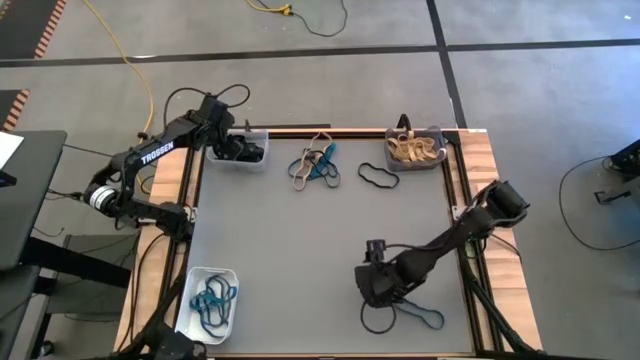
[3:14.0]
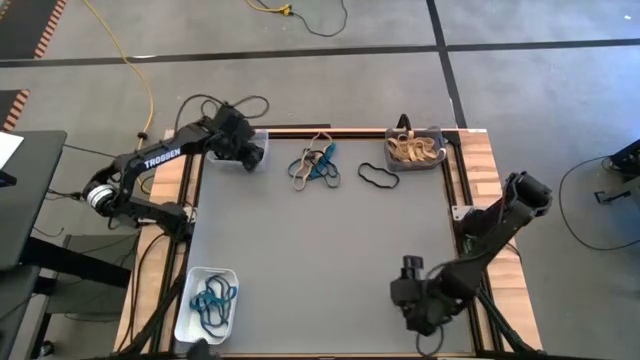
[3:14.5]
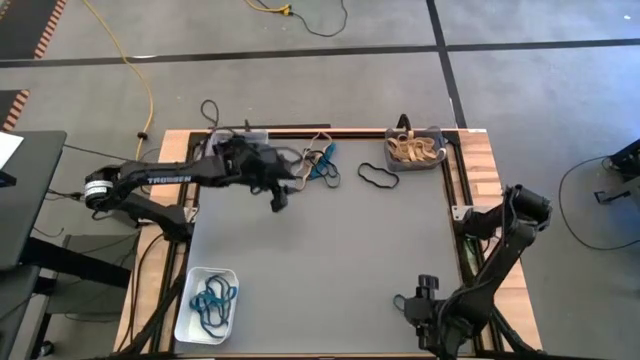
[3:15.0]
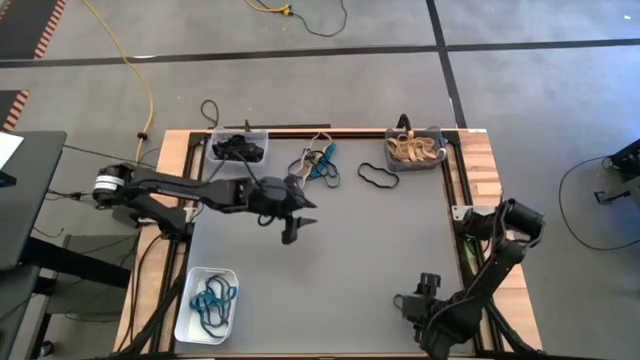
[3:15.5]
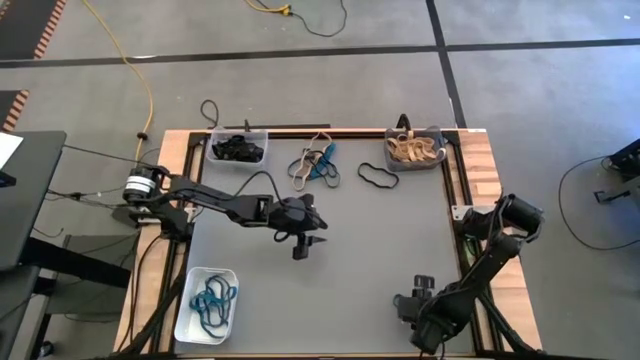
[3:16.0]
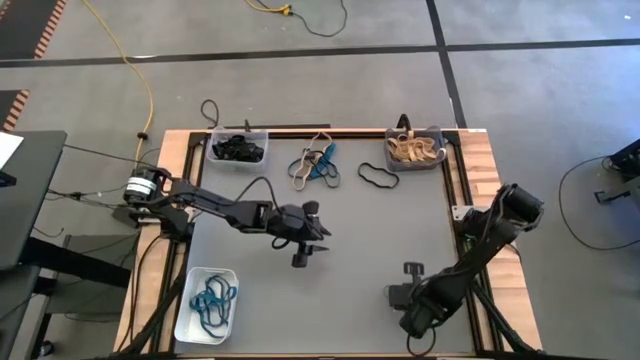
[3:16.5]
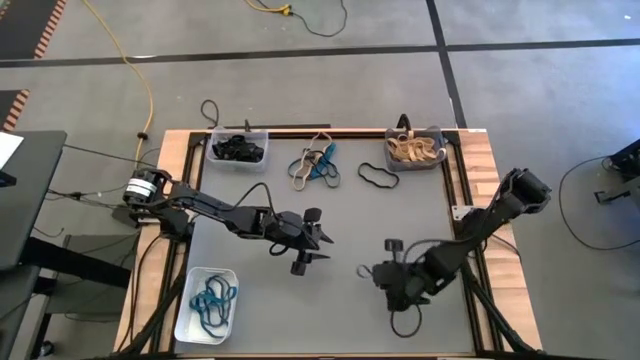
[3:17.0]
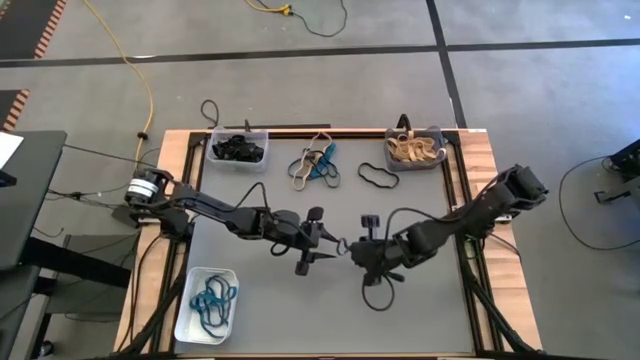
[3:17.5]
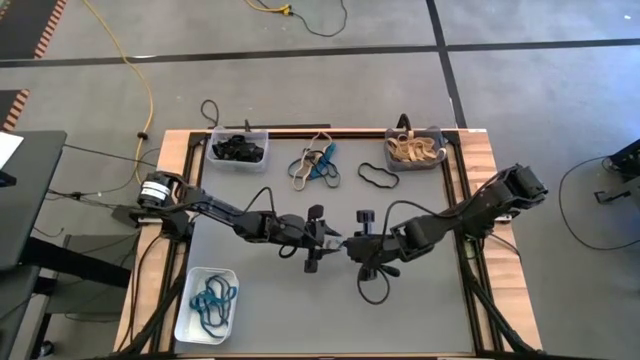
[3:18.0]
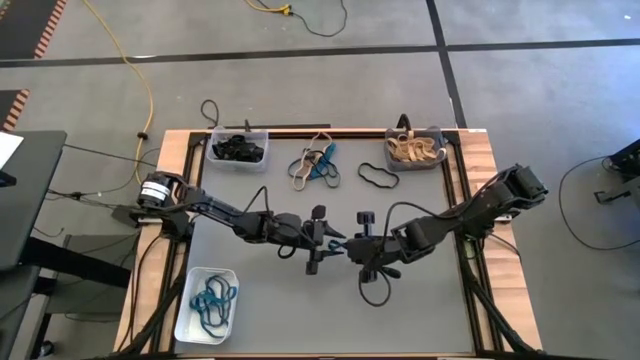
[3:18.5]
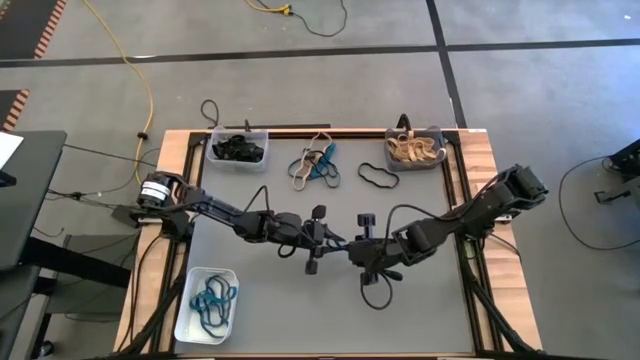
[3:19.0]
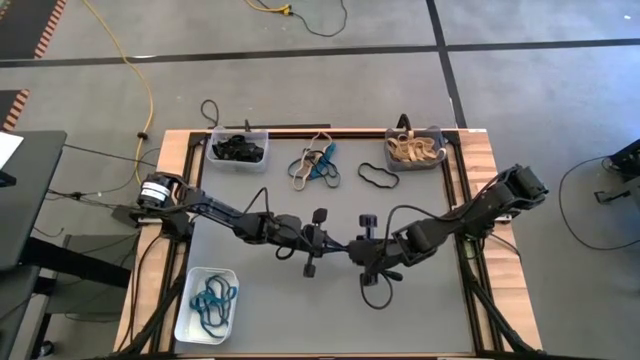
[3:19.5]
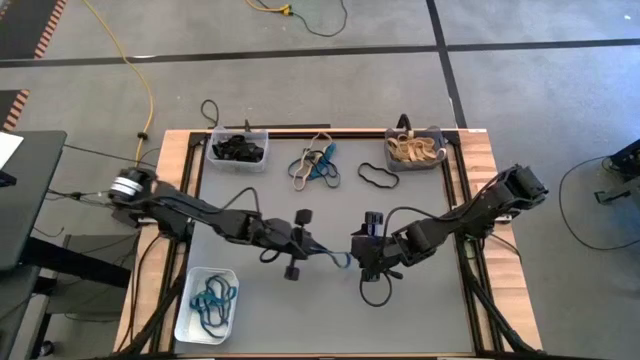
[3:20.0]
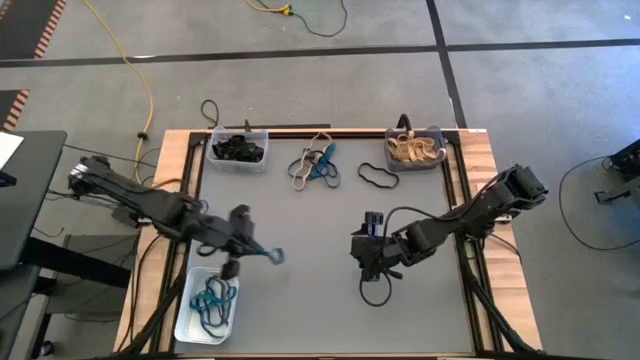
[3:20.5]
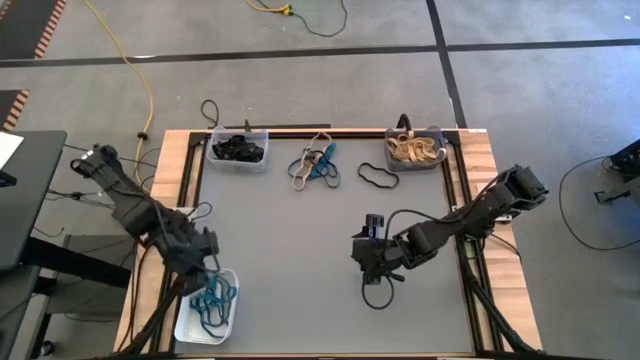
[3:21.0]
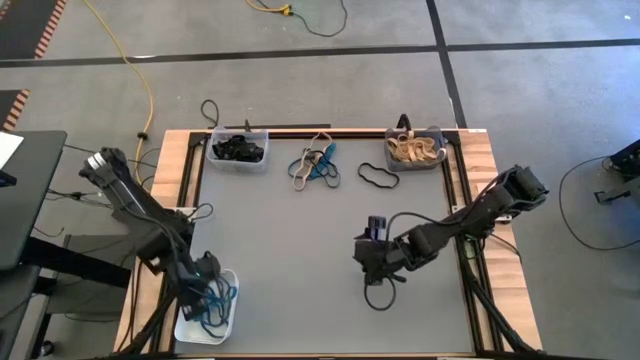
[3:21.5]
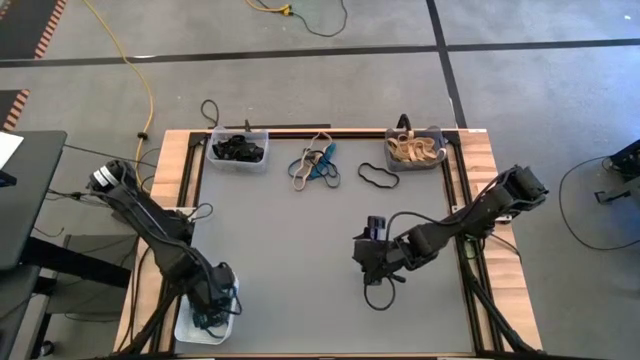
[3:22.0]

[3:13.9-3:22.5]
Task: Sort rubber bands into baskets
Put the blue rubber band into the white bin

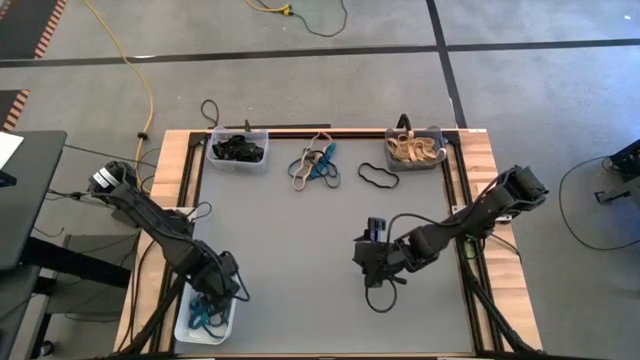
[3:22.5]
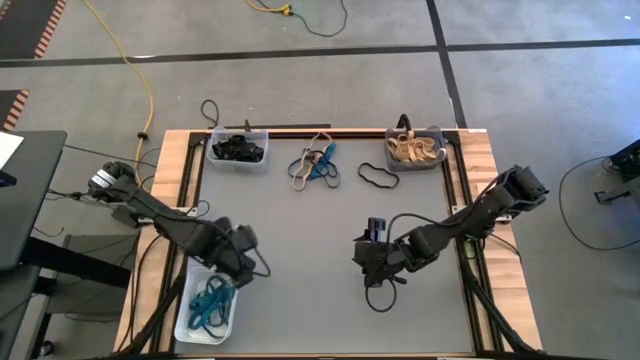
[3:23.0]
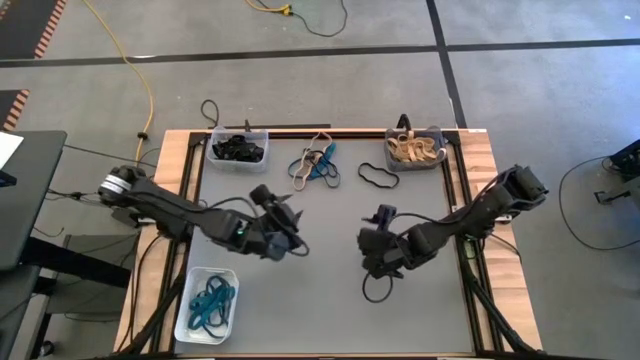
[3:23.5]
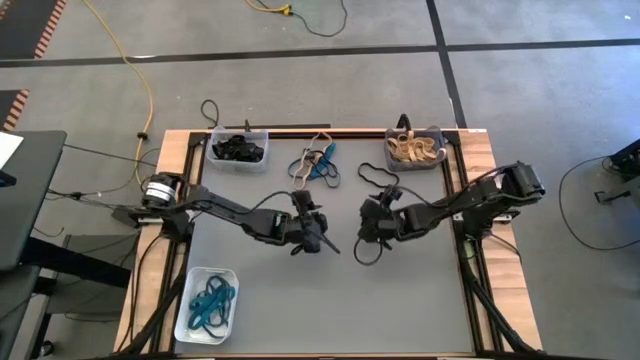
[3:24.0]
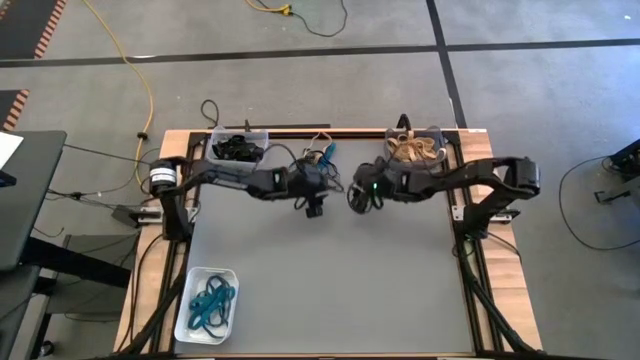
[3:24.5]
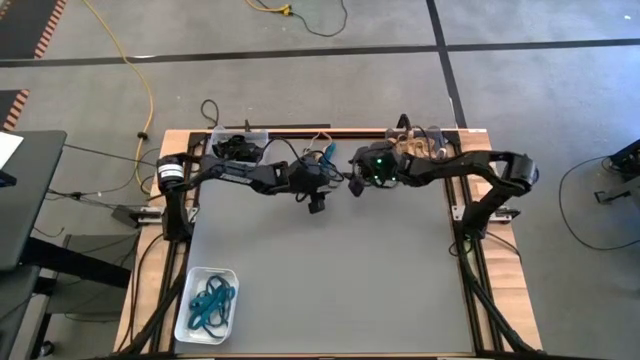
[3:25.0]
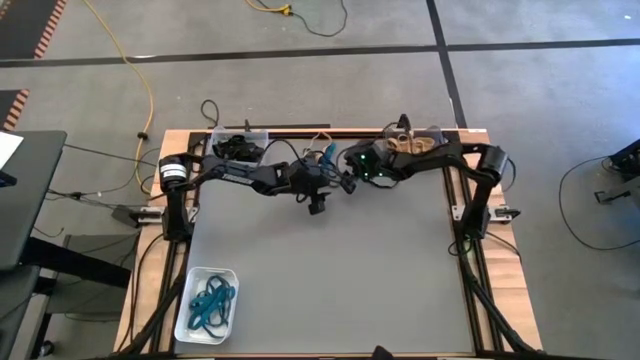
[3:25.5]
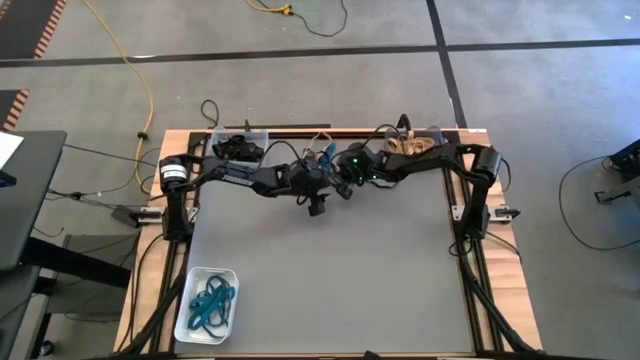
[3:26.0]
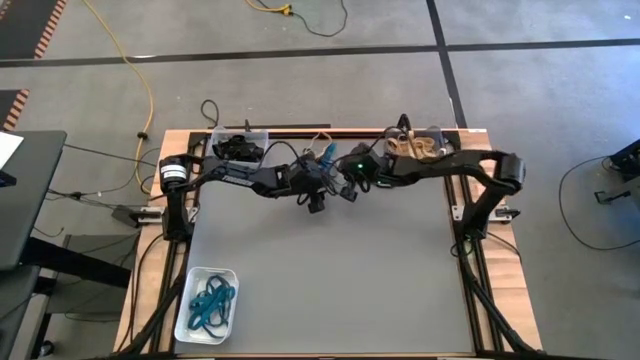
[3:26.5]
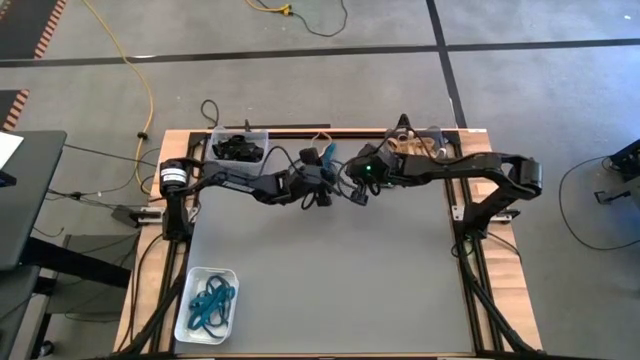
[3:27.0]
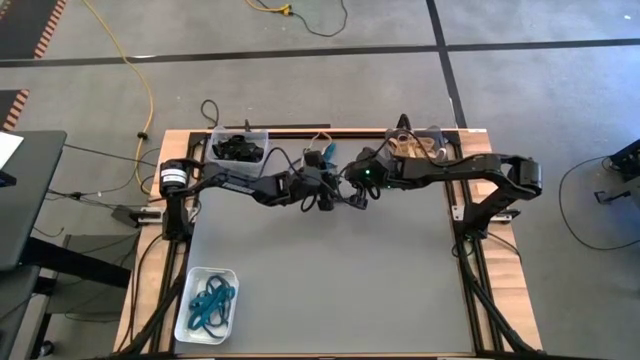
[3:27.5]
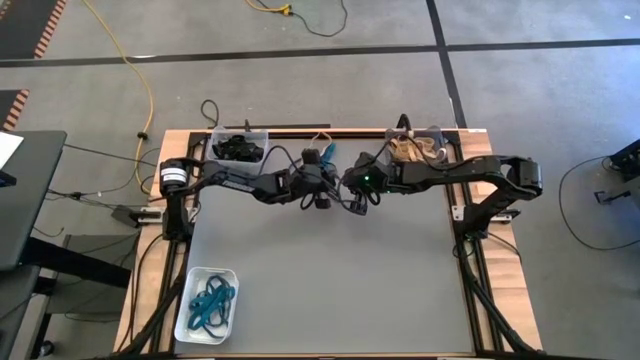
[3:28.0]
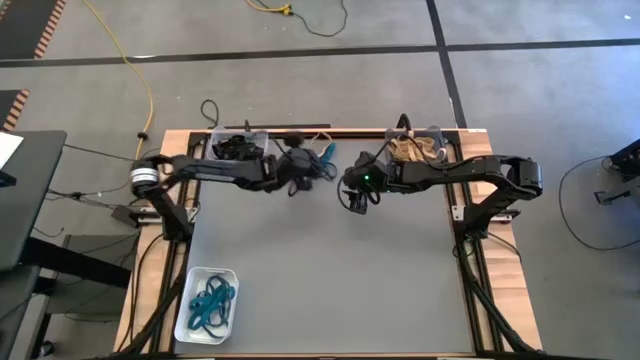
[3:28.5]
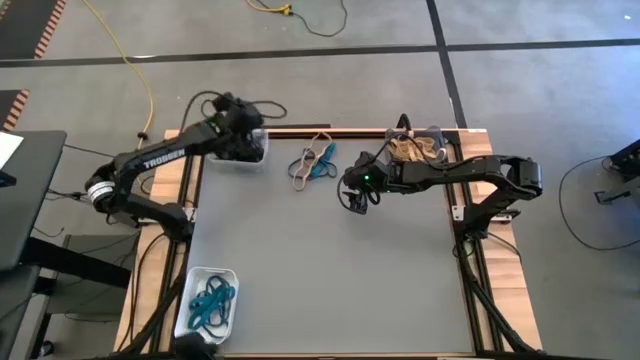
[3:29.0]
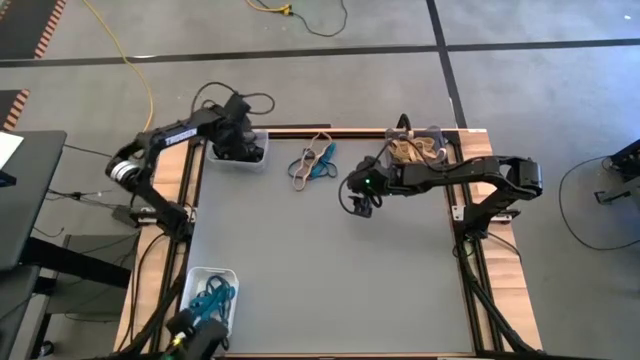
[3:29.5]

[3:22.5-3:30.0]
Put the black rubber band into the transparent bin

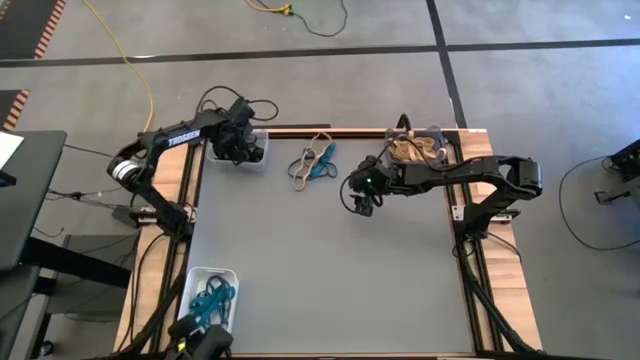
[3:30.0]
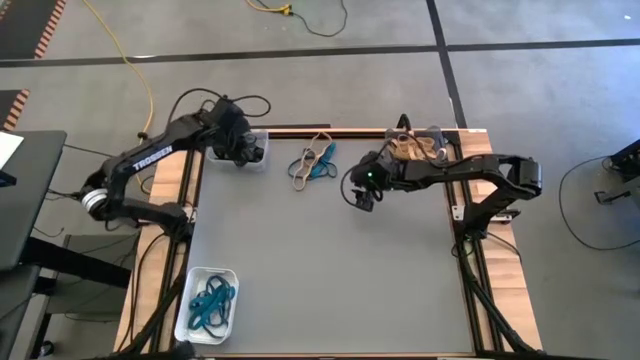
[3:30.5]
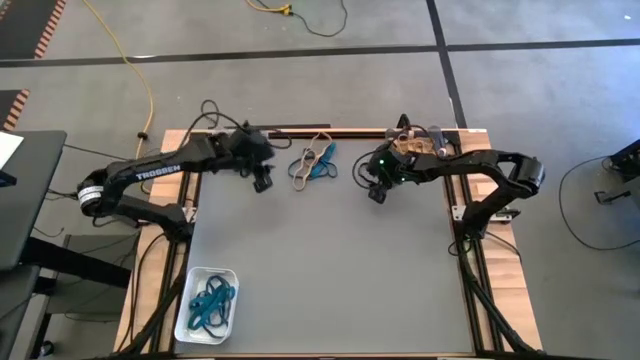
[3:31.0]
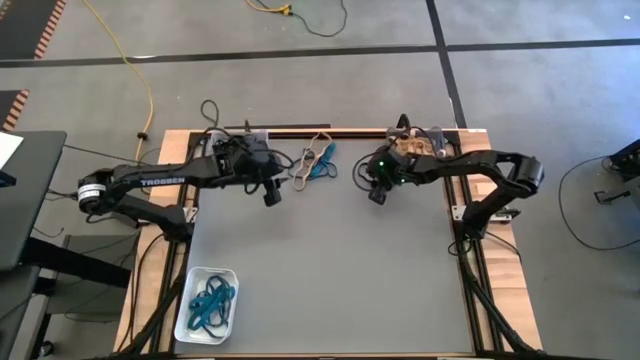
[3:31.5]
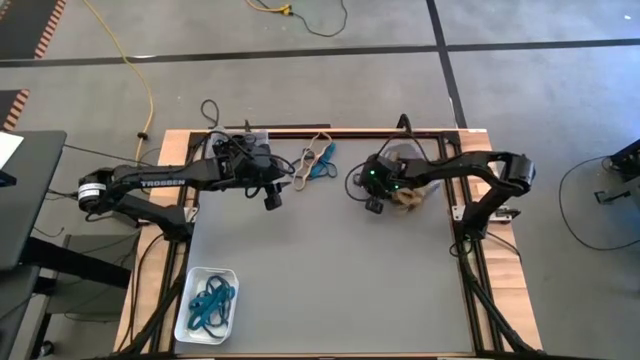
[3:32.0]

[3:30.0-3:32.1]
Put the black rubber band into the transparent bin
